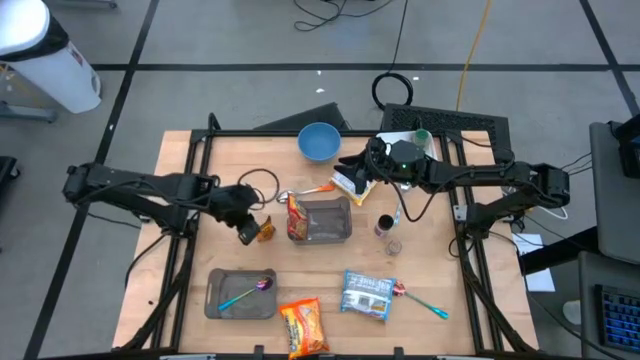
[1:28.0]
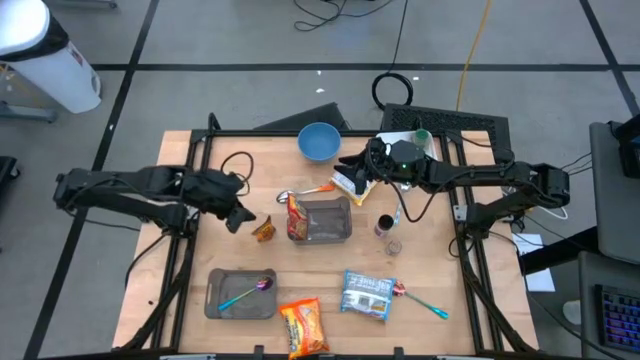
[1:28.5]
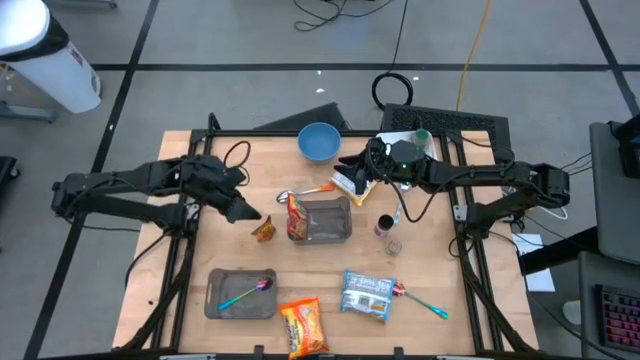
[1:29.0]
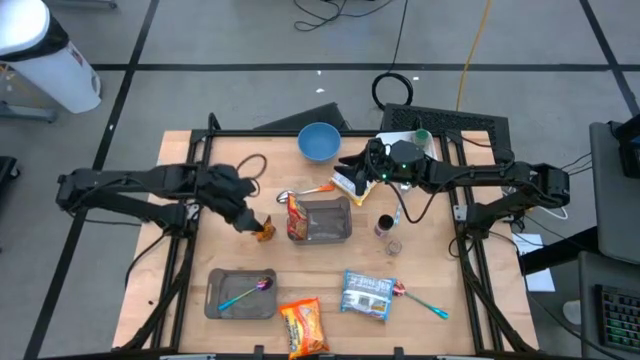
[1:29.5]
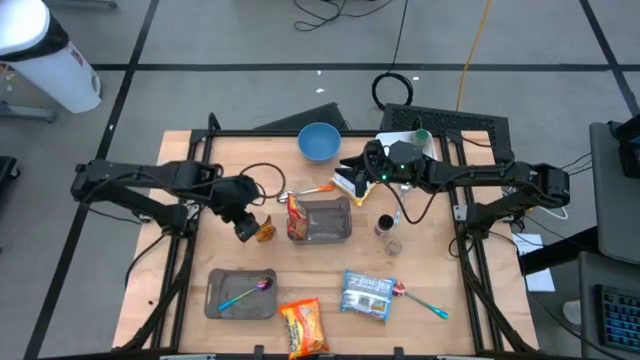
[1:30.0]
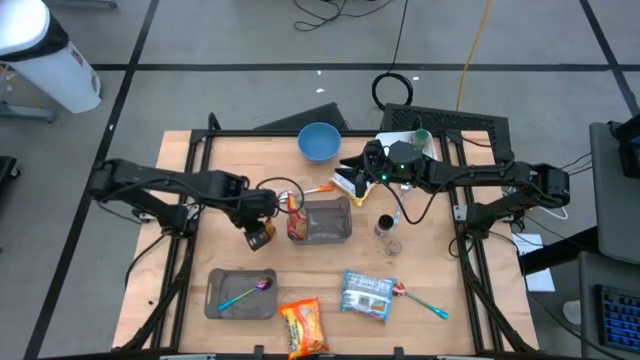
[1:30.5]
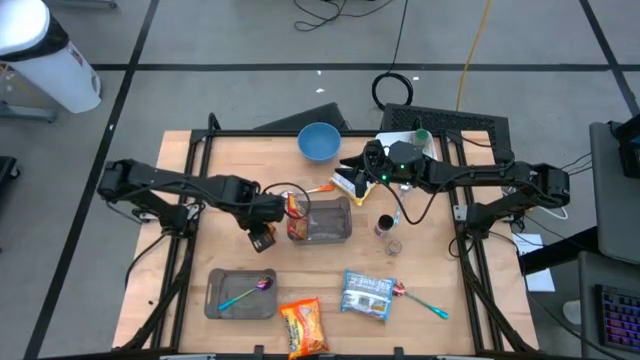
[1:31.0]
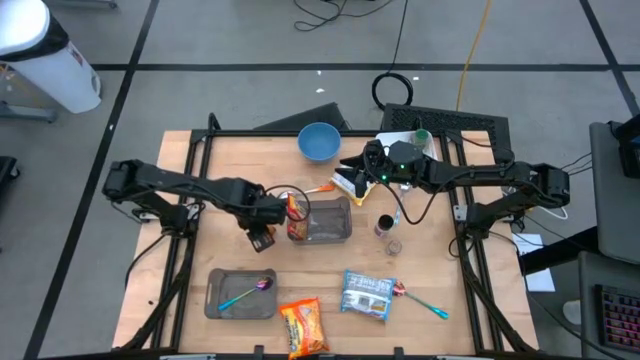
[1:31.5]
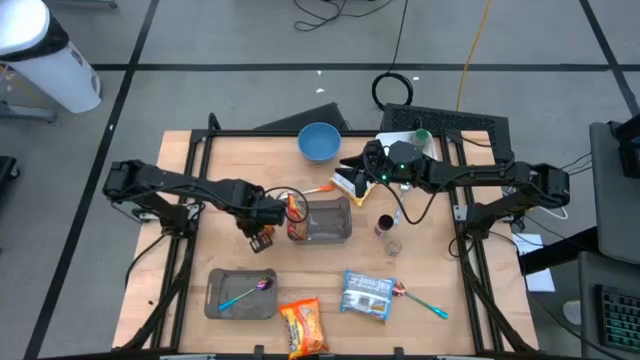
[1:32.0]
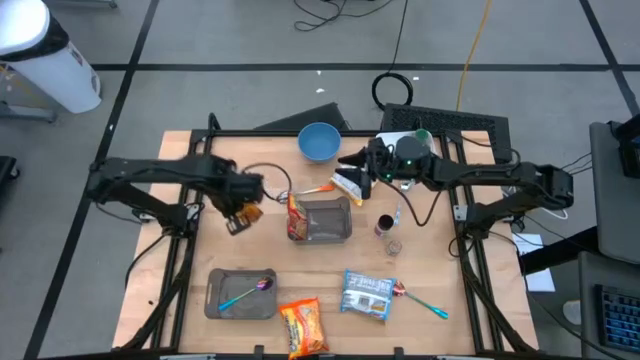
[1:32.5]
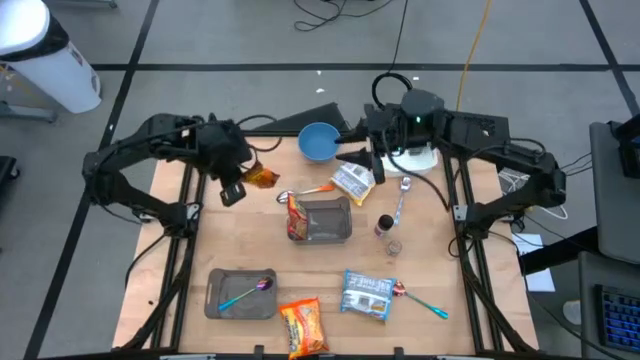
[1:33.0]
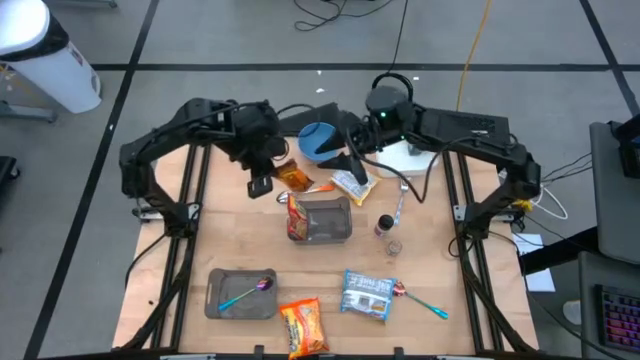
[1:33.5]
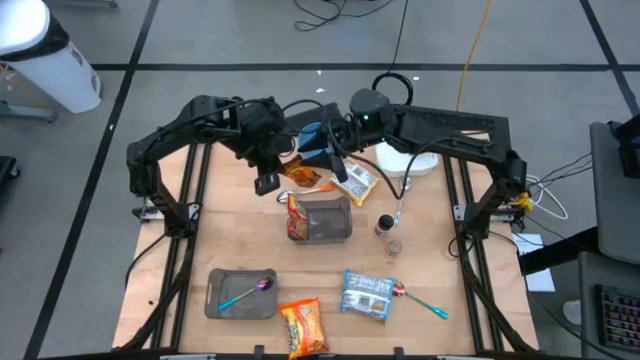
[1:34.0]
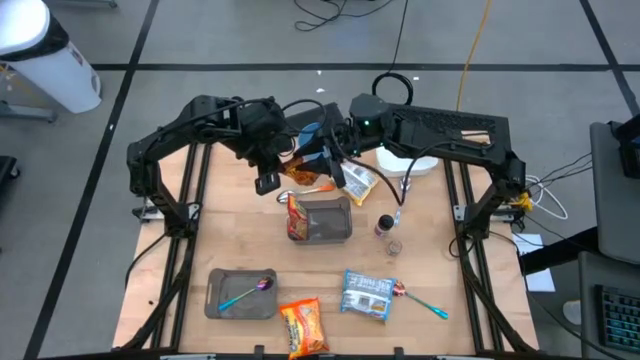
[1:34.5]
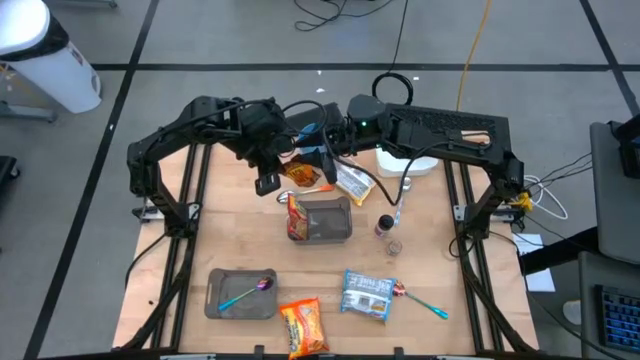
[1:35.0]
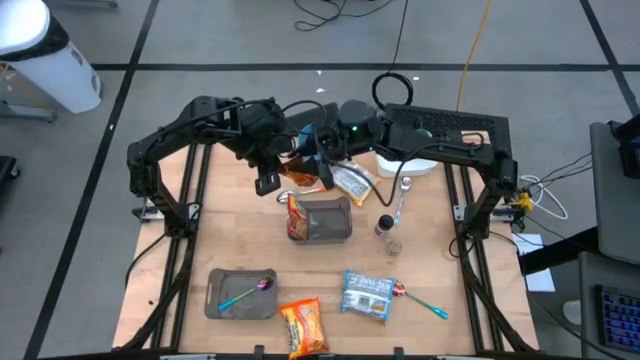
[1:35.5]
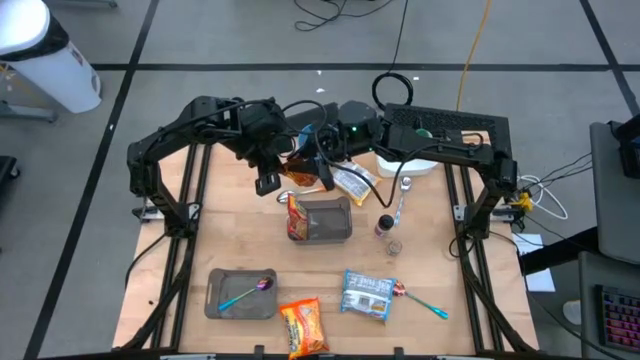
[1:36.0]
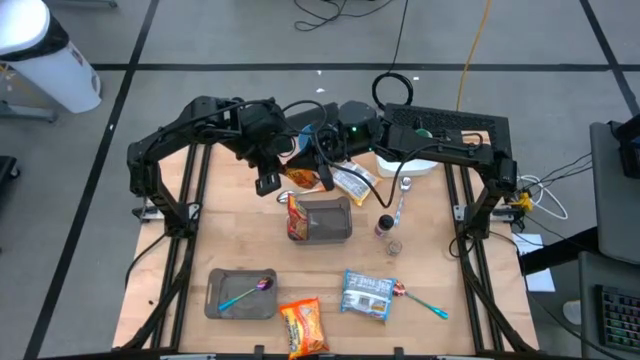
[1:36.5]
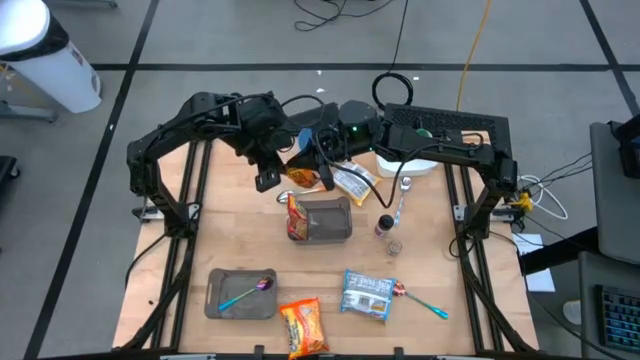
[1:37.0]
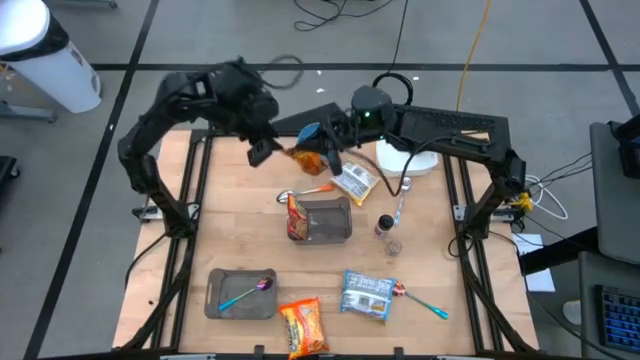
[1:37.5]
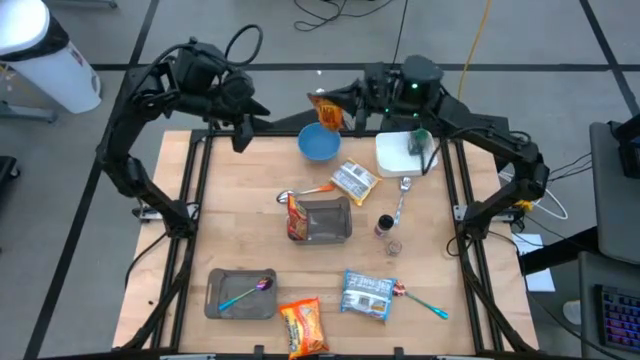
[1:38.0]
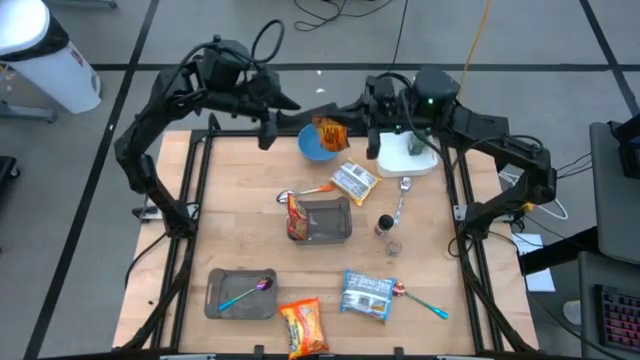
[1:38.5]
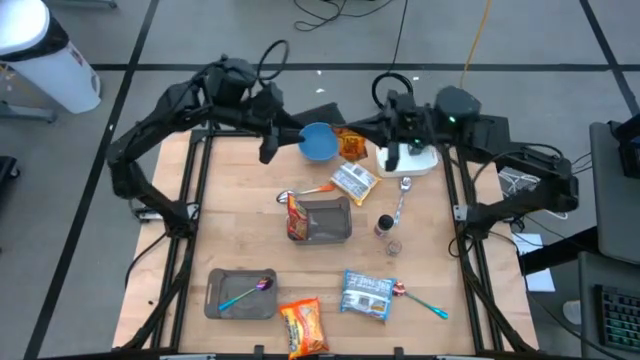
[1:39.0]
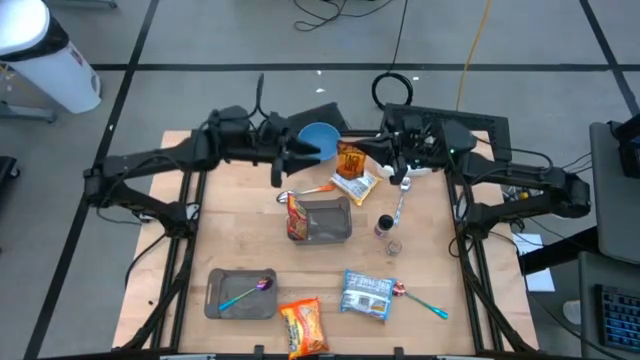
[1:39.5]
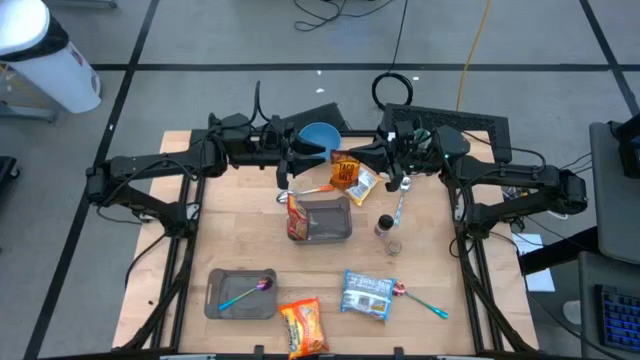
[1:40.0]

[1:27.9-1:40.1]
Task: Pick & Place Food Item
Put the seasoning pack into the white bin

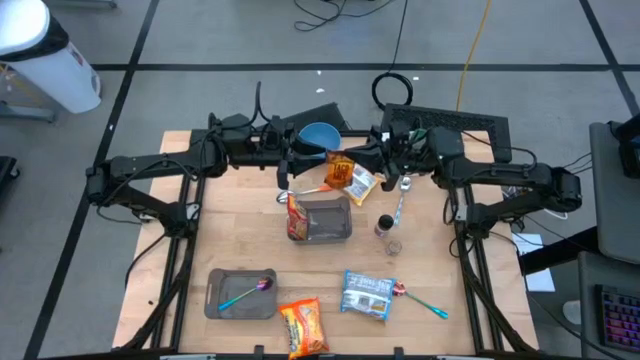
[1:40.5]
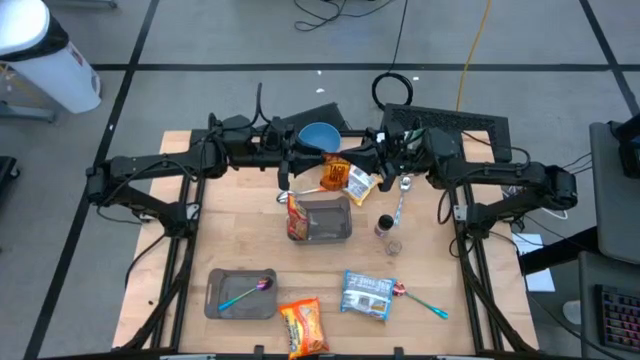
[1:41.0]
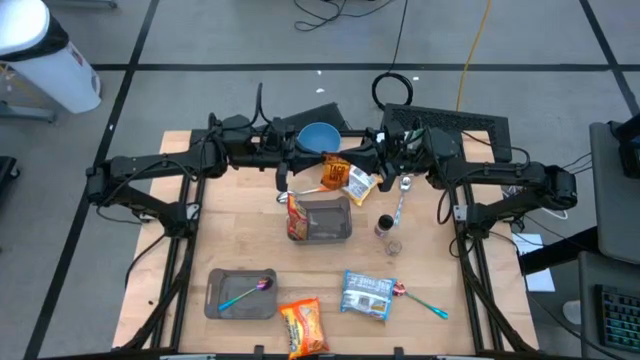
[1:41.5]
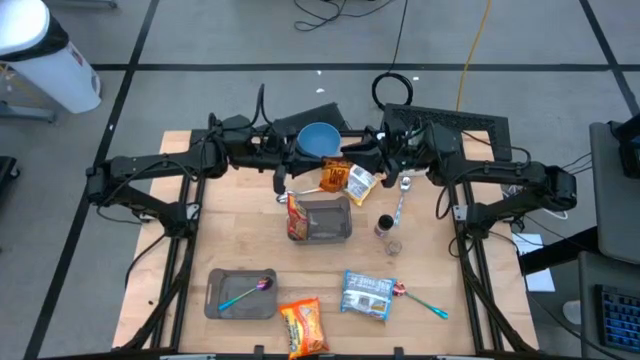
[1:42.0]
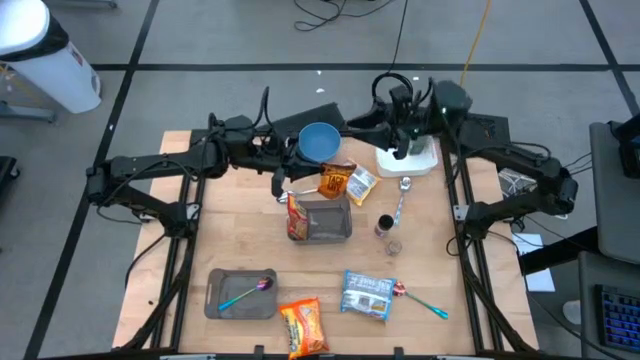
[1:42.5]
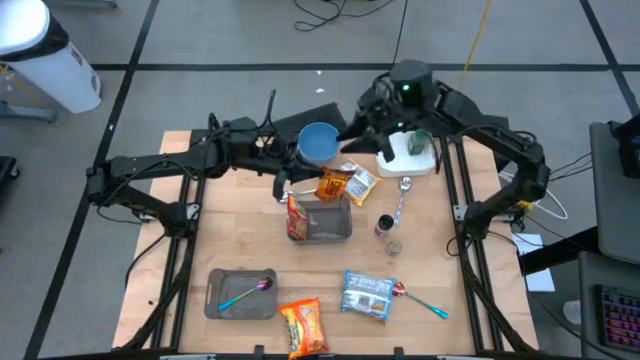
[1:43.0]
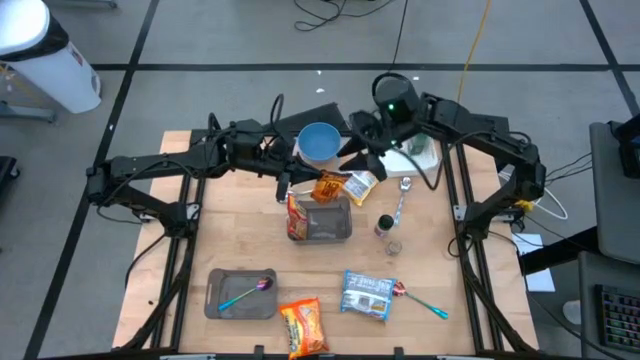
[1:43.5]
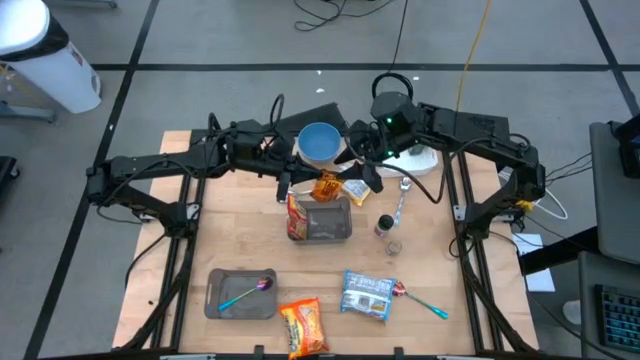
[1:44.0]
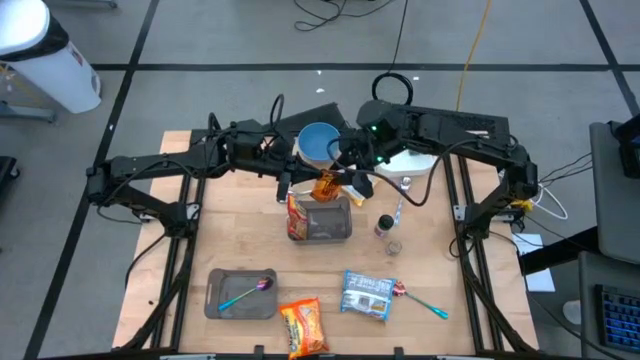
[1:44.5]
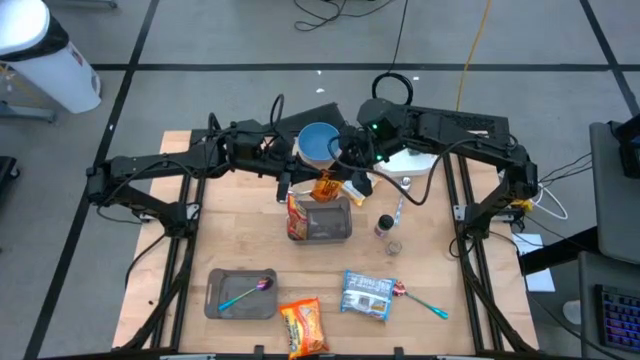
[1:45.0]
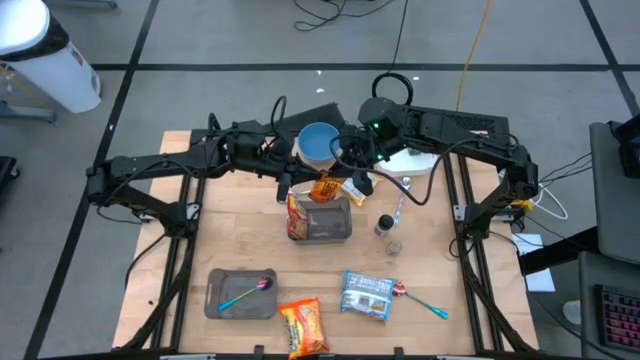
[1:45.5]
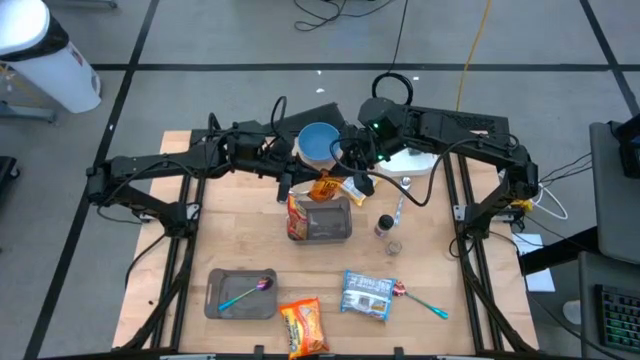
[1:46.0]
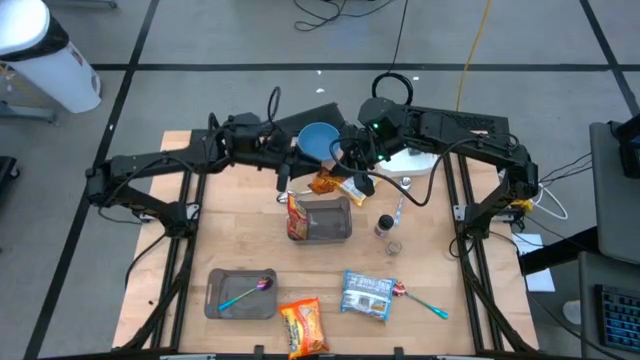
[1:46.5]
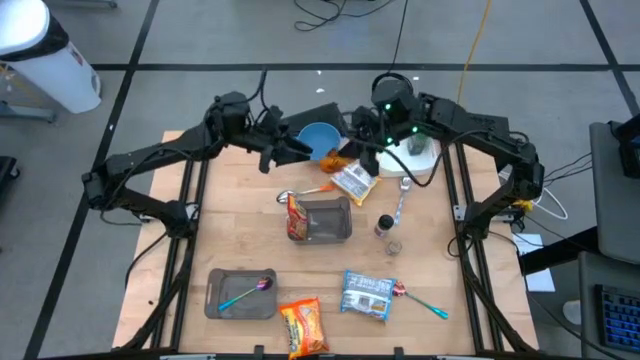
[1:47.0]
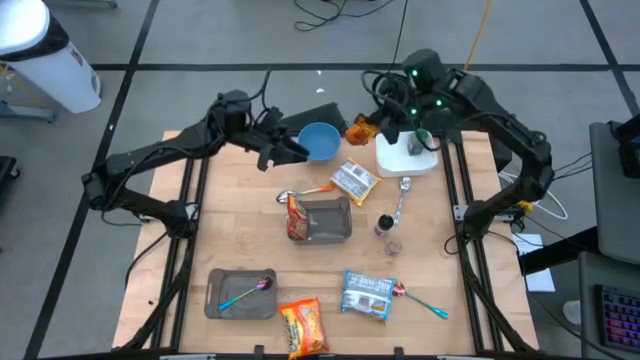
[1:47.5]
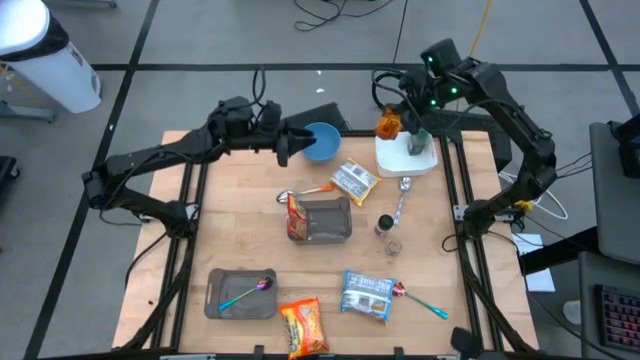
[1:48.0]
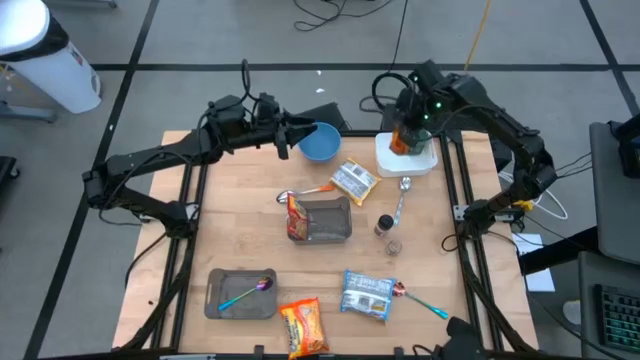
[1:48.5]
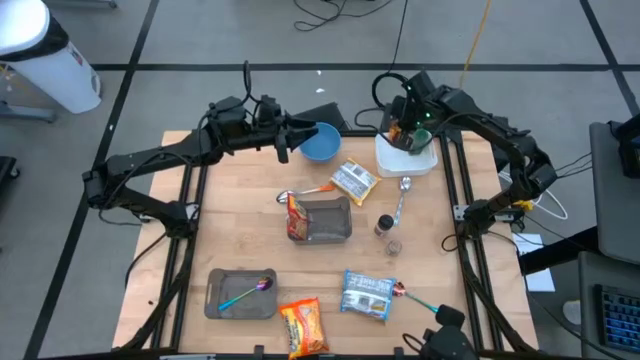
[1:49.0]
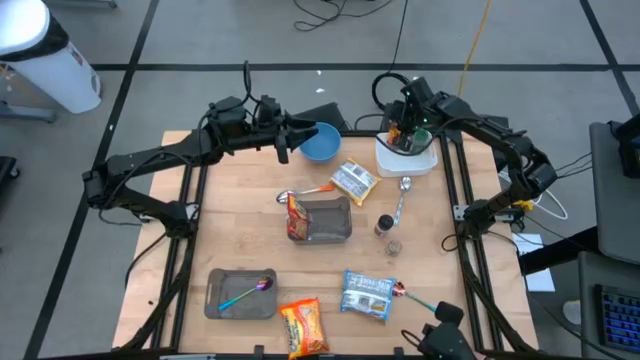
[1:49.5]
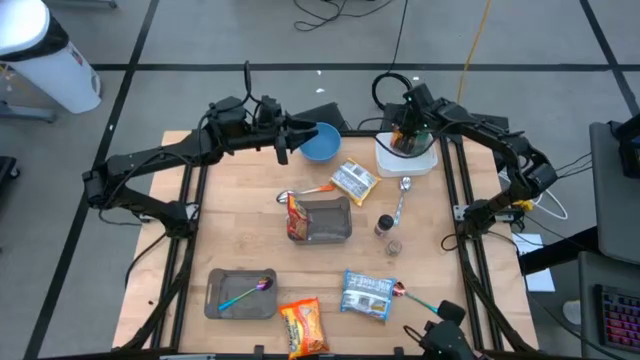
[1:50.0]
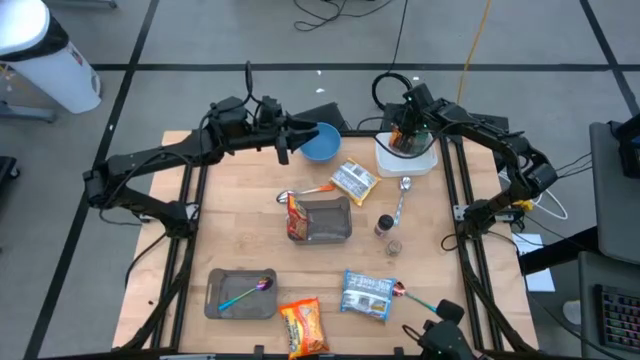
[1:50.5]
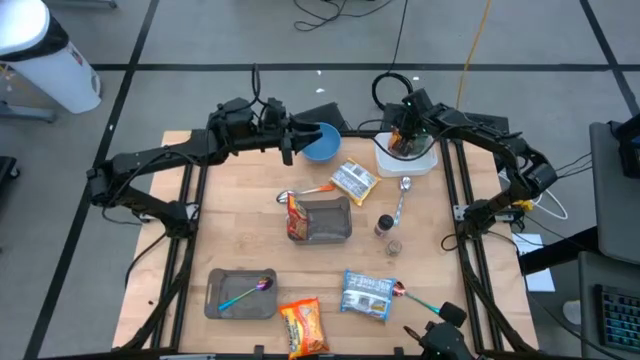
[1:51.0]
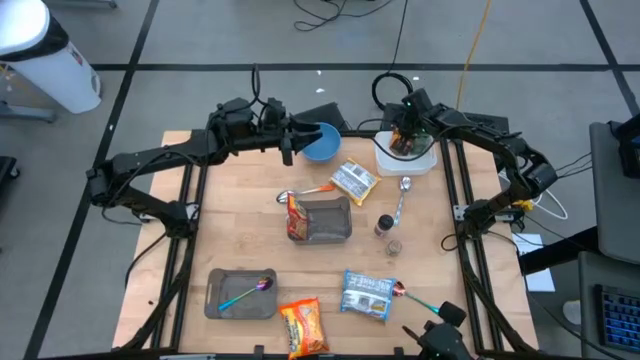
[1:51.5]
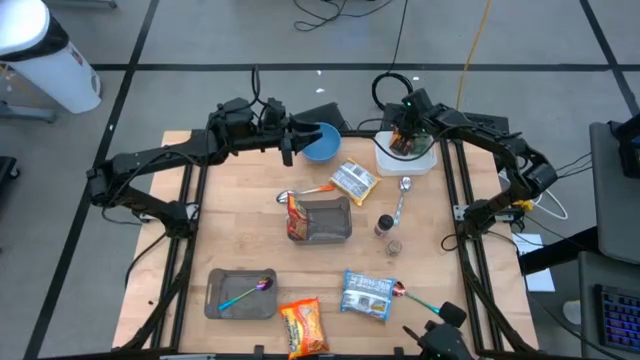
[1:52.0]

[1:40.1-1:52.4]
Put the seasoning pack into the white bin
